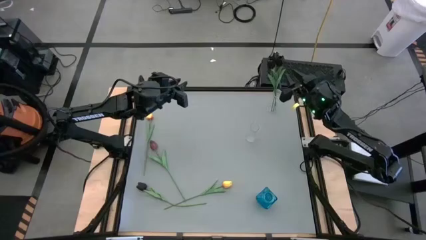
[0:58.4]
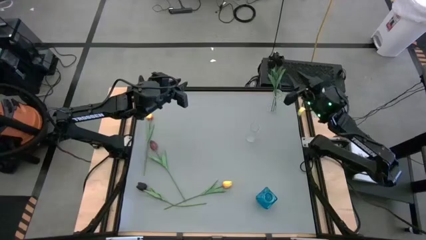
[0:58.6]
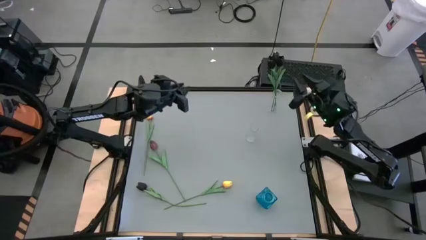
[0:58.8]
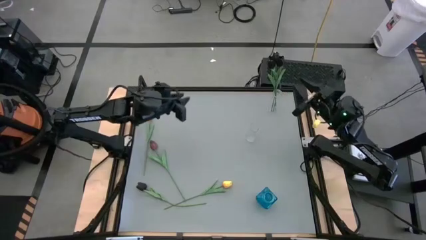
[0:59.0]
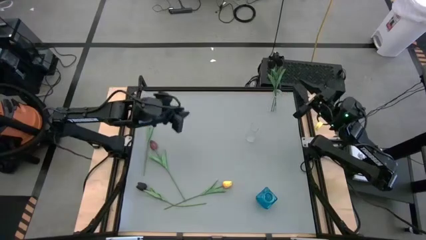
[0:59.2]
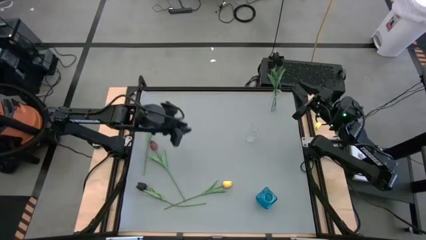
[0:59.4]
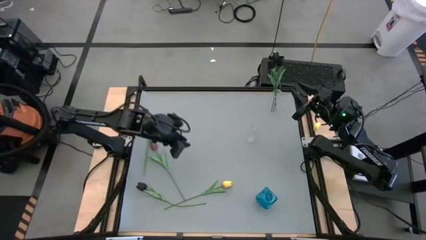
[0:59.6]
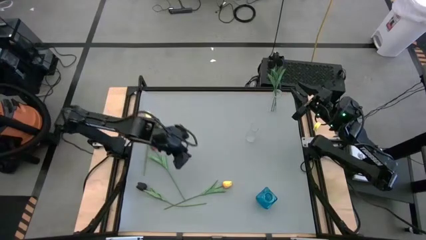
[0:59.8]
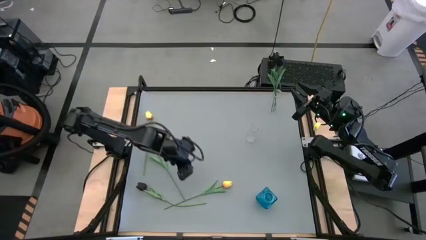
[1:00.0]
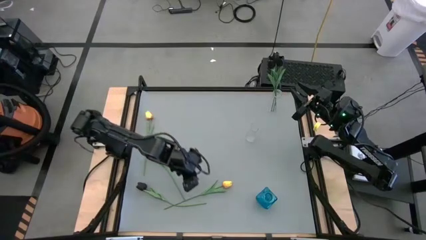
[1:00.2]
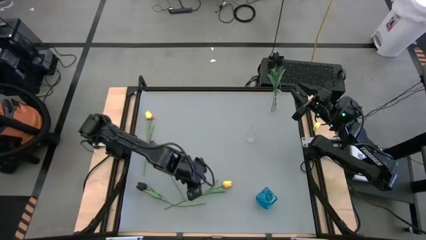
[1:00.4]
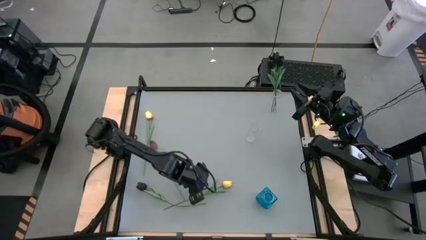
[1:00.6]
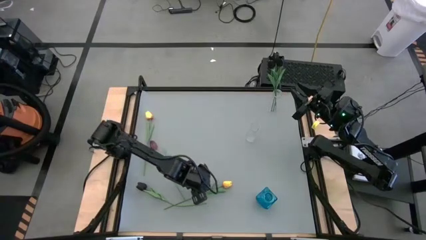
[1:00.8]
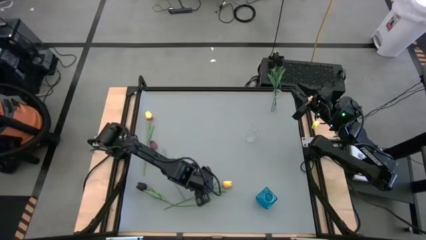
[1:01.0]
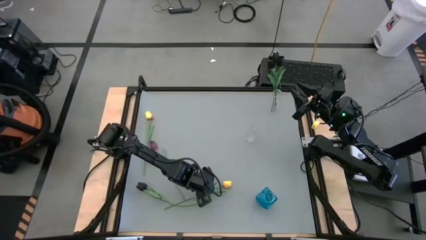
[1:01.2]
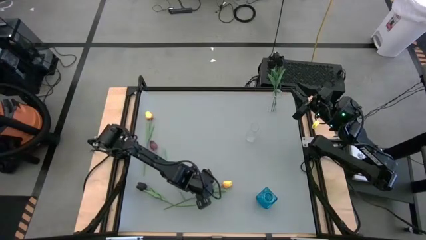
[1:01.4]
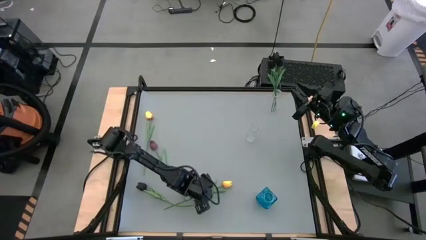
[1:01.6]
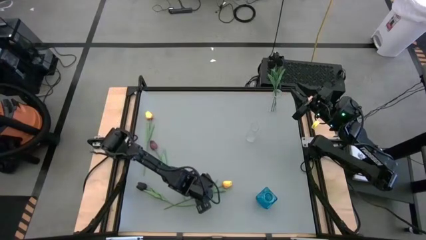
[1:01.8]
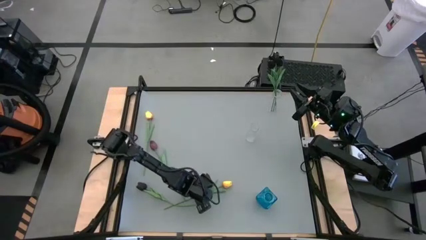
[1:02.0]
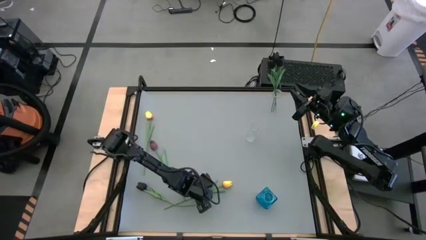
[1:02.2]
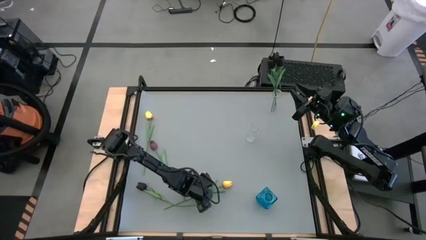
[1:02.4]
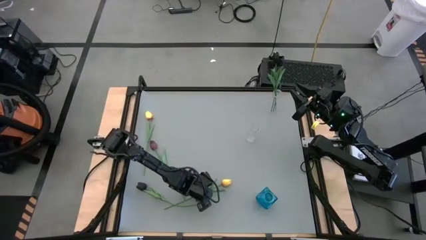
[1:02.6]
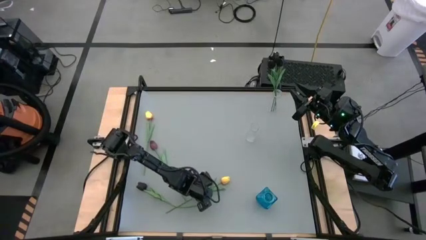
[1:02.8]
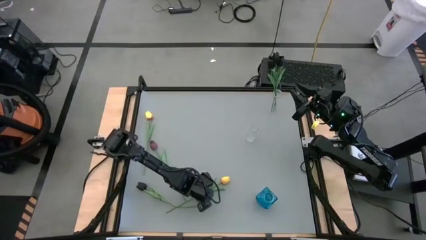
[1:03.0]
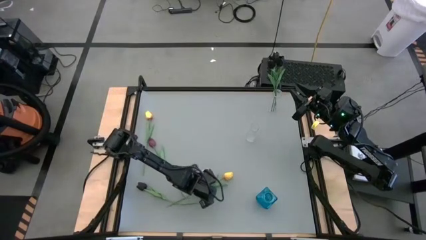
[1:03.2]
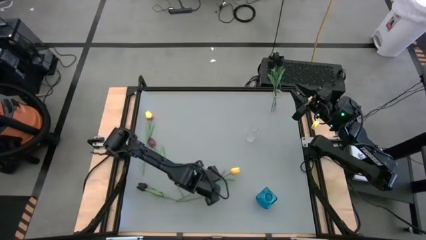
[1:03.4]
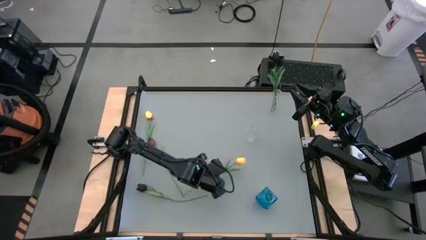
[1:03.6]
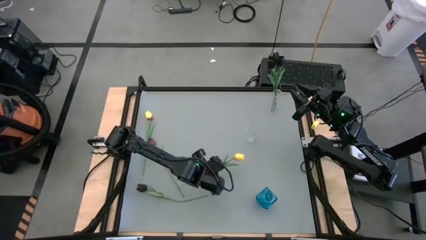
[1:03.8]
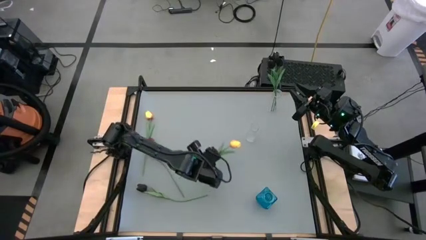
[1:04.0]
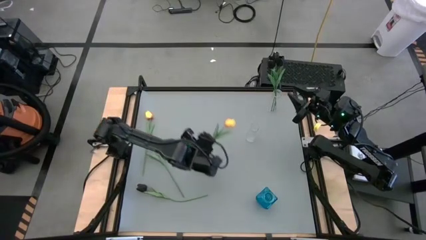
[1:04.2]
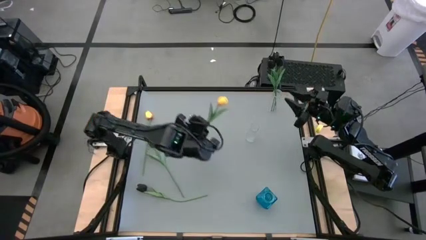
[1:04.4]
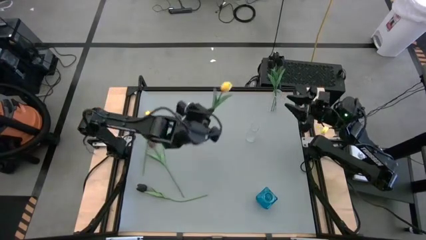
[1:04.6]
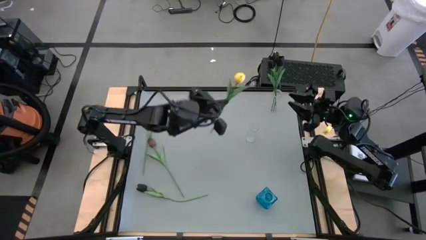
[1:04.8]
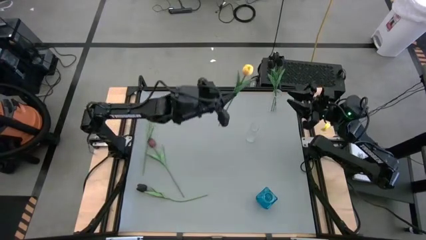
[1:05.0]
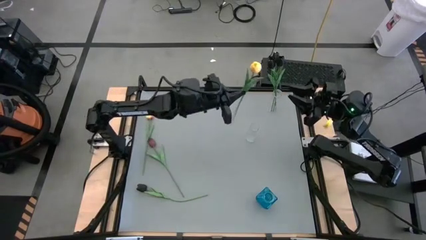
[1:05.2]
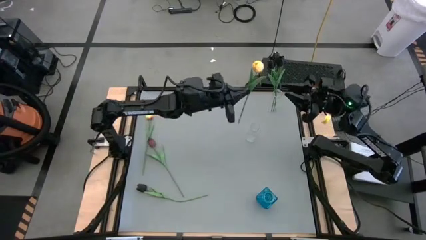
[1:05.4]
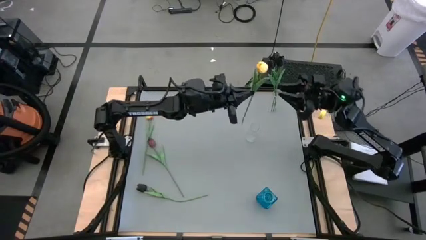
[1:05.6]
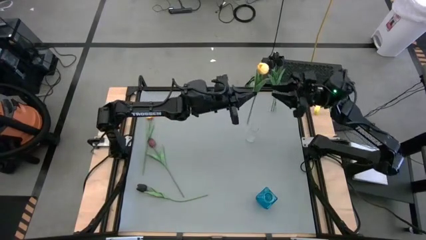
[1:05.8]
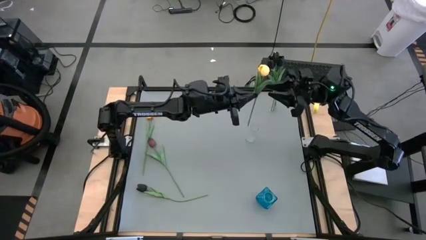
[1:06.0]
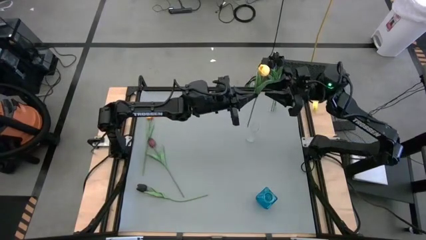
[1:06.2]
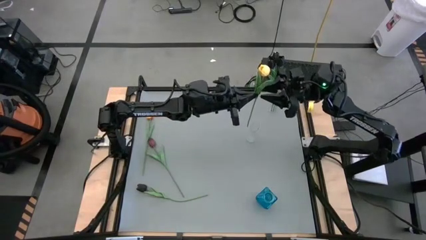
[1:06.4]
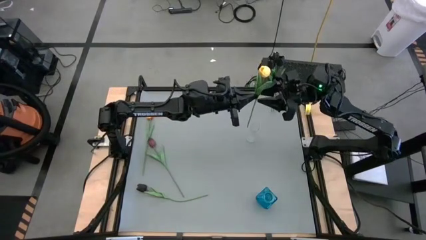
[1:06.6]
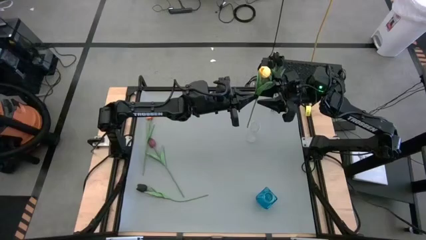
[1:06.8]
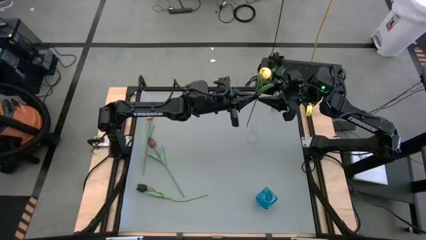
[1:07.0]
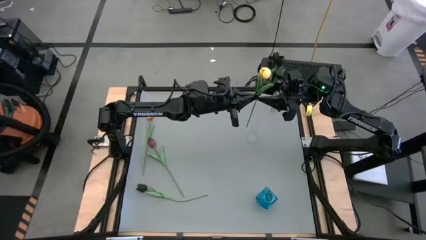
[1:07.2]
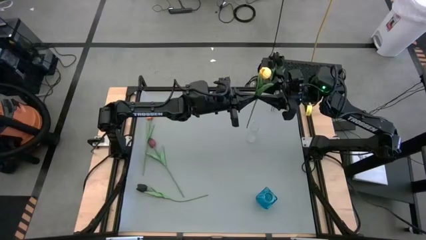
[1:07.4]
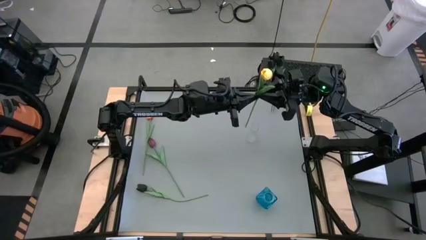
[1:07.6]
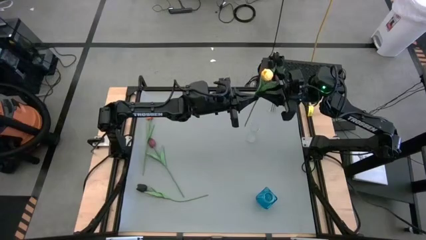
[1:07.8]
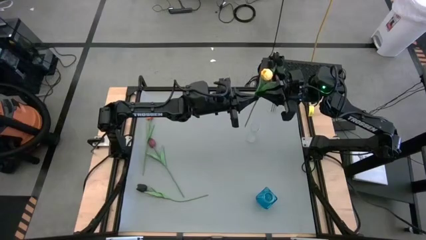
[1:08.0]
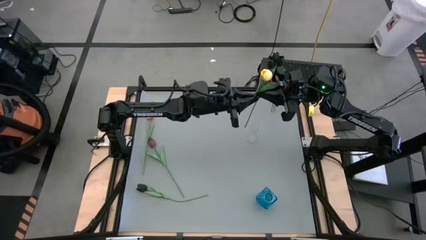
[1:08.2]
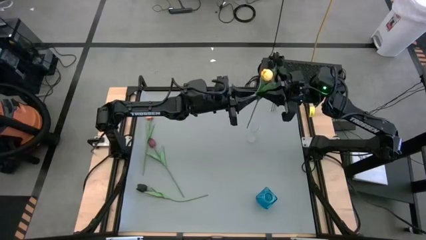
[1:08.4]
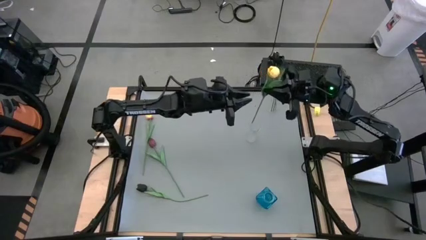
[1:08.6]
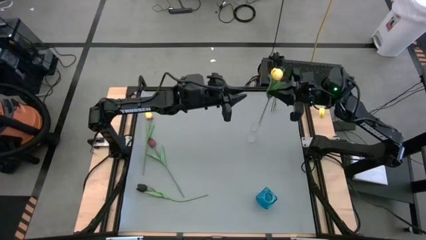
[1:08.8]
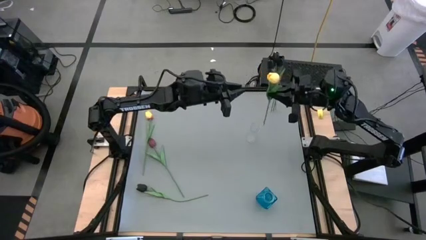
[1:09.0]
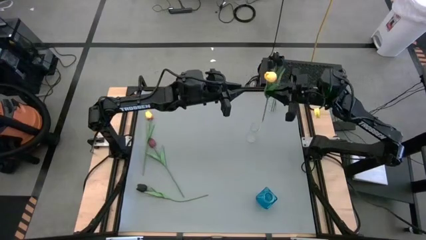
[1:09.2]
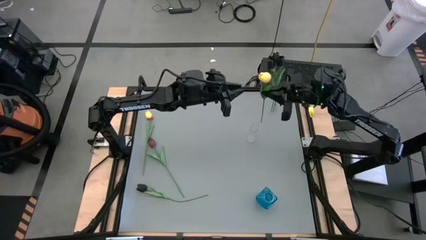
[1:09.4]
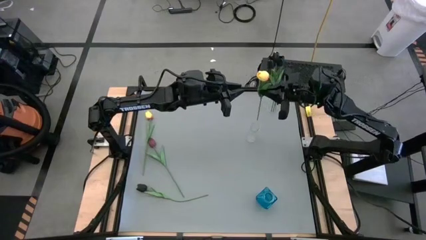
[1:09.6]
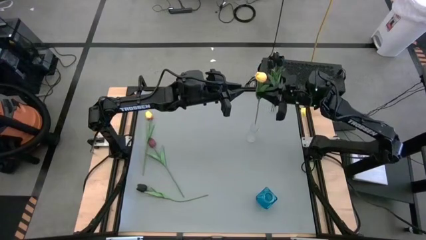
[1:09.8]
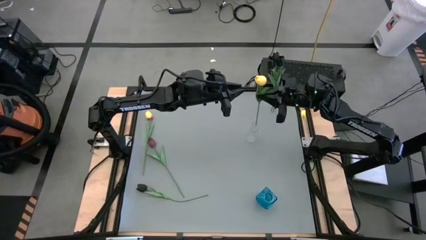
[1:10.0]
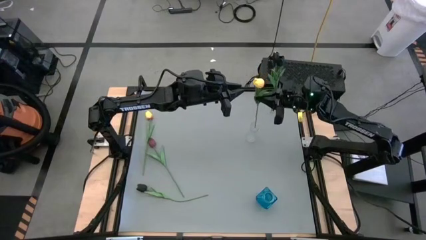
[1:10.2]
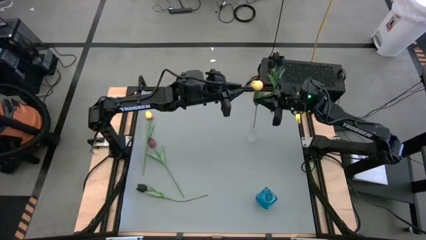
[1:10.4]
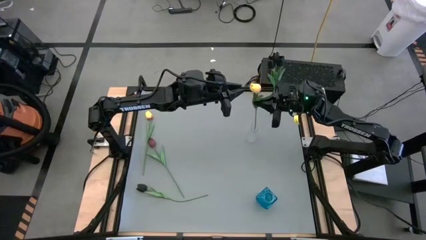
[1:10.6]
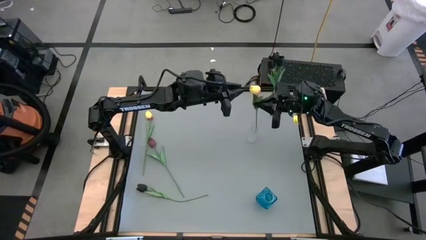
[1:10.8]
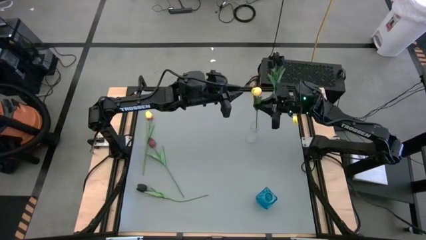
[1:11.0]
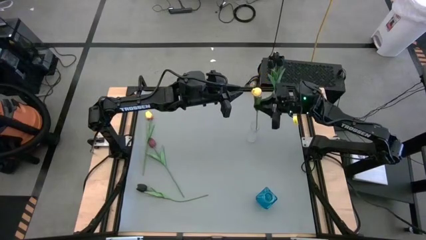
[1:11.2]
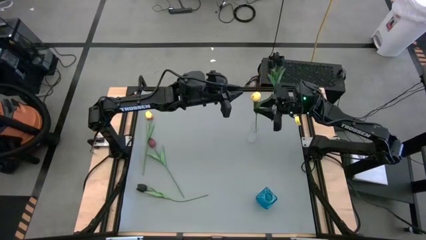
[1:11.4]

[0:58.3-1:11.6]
Task: Sort flowers into vase by color
Put the bottom yellow tulip into the bottom transparent vase

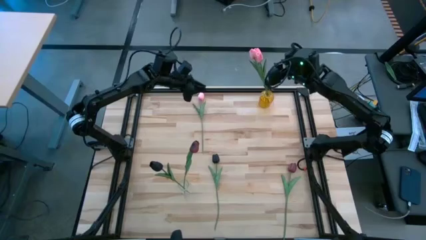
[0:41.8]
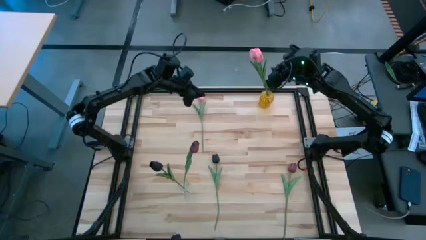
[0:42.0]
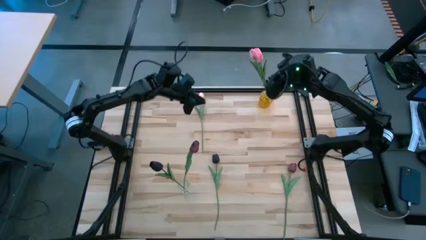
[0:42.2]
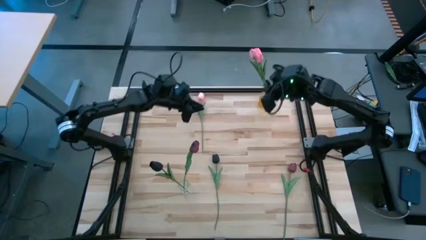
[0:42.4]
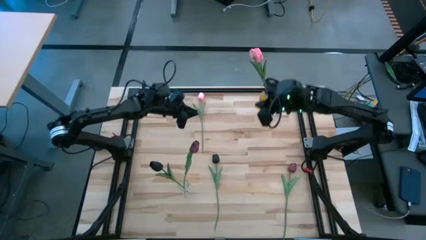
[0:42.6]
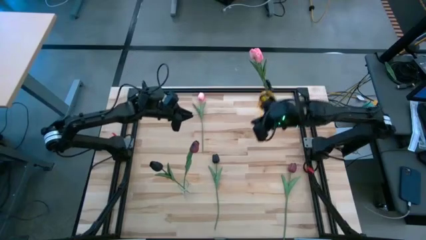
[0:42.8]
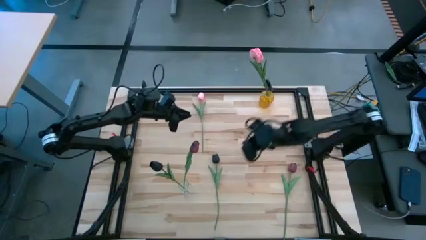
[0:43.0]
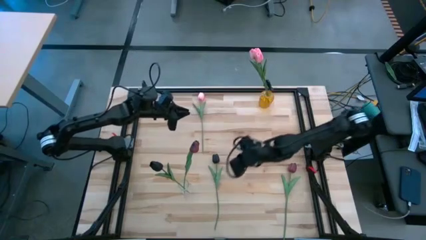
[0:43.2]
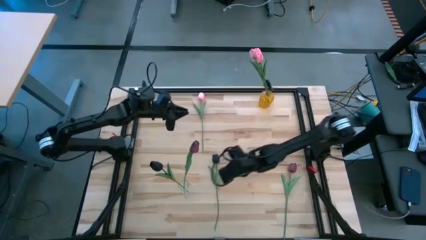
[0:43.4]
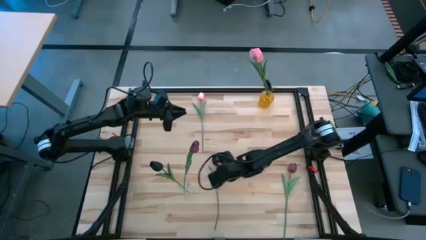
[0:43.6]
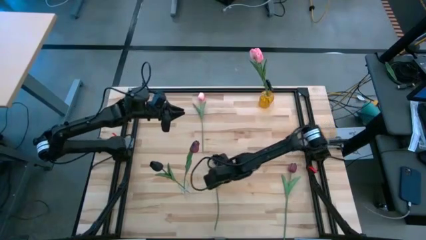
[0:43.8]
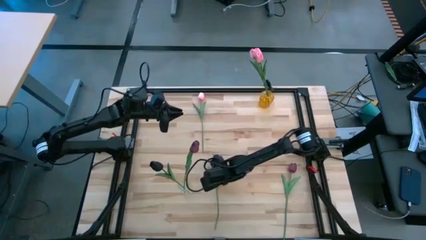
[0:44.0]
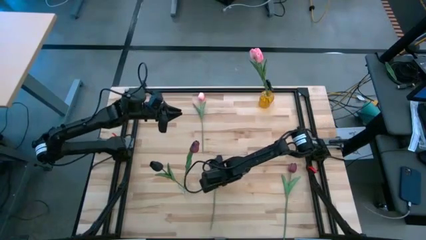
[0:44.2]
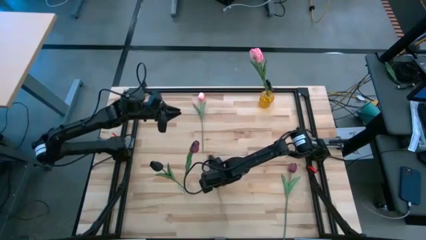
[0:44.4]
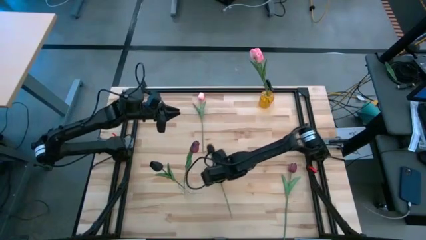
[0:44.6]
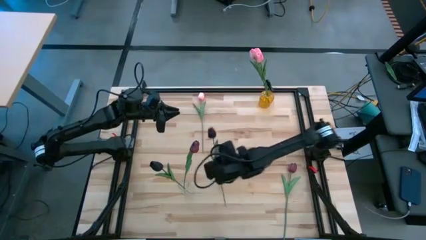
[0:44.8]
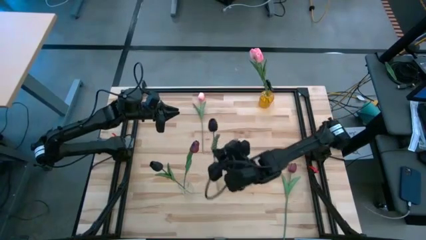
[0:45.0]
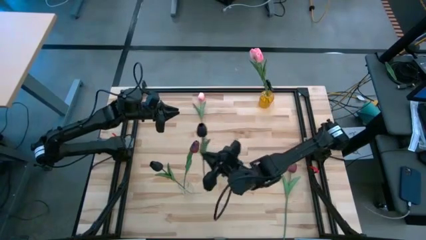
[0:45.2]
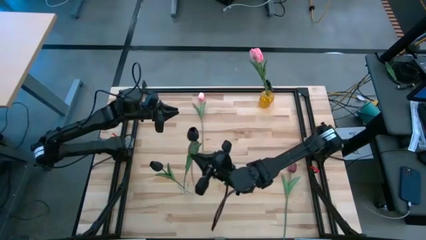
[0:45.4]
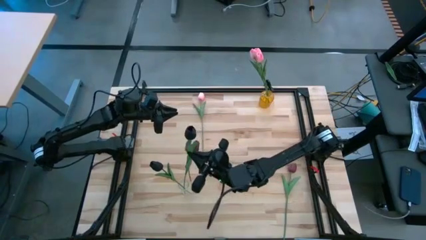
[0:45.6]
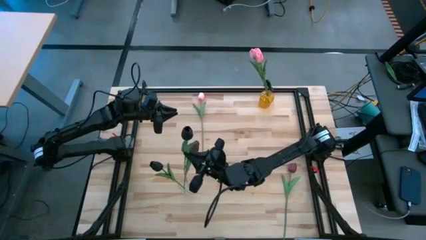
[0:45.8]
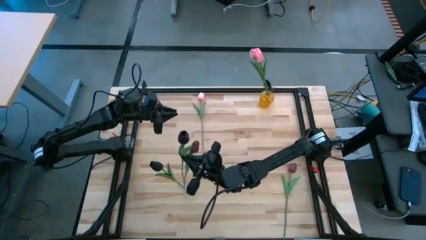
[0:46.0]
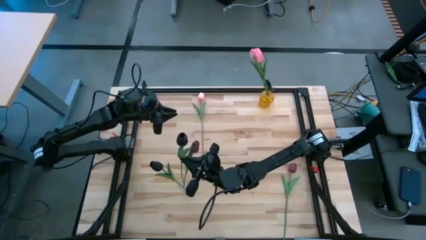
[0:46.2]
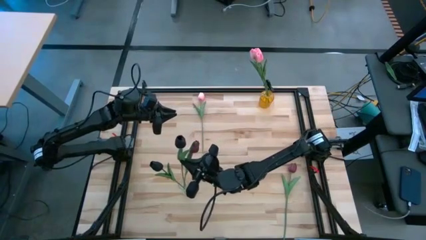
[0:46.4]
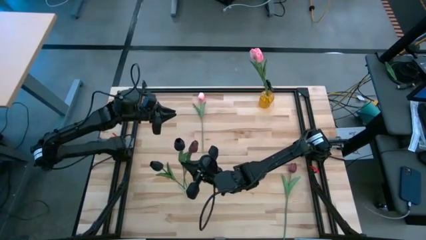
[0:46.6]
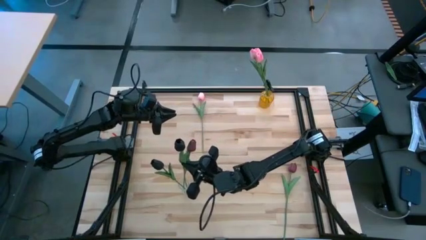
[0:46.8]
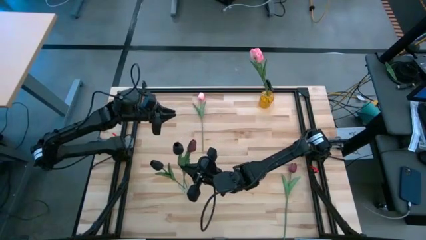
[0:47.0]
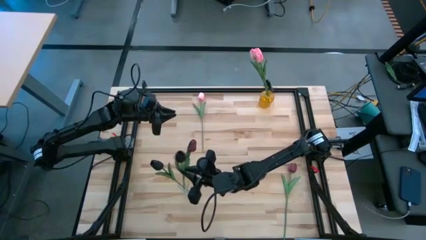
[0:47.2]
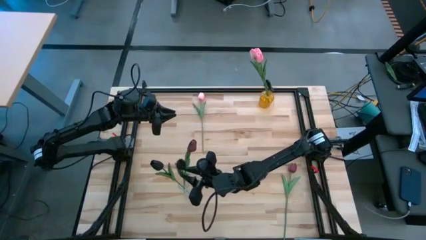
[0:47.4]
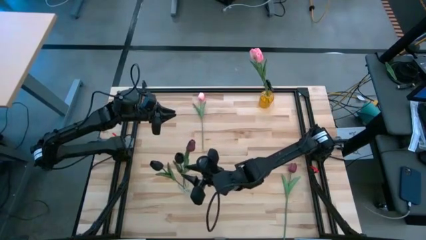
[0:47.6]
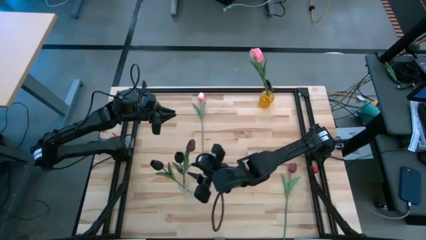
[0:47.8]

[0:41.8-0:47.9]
Task: Sort flowers into vase by color
Put the black tulip flower into the crystal vase
